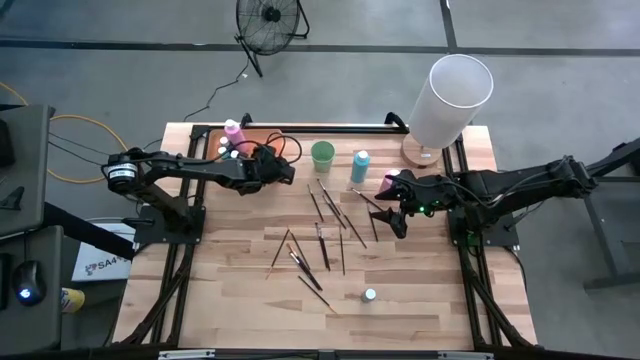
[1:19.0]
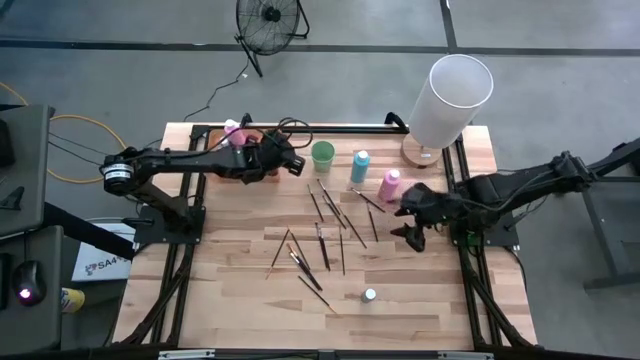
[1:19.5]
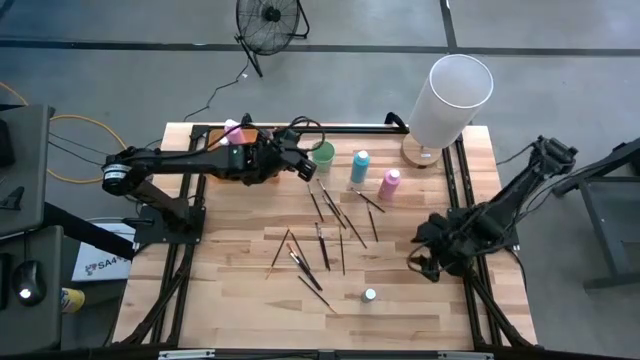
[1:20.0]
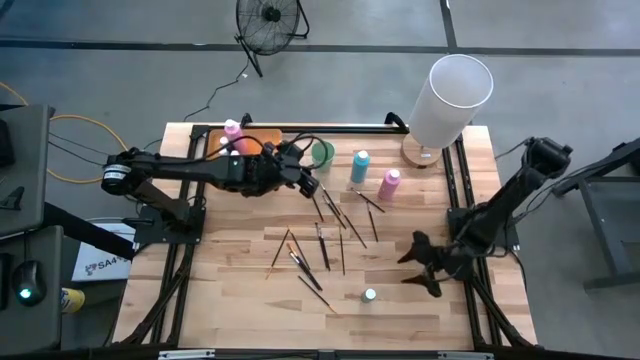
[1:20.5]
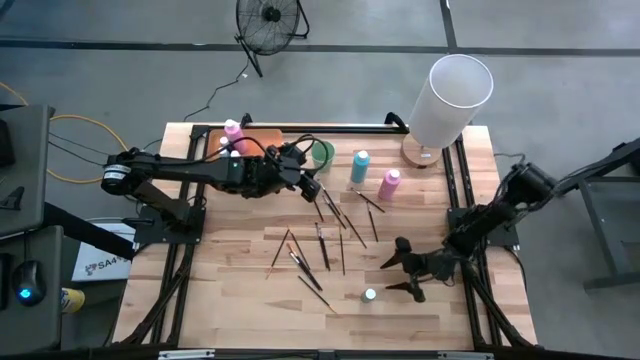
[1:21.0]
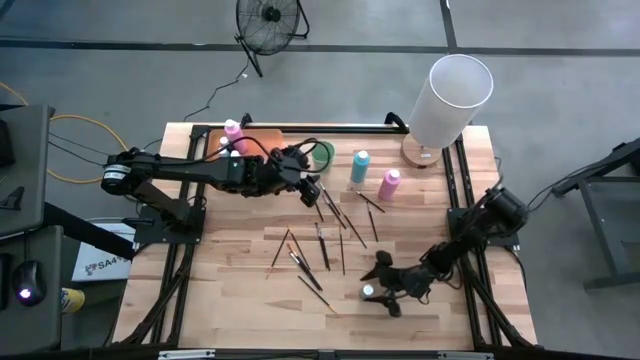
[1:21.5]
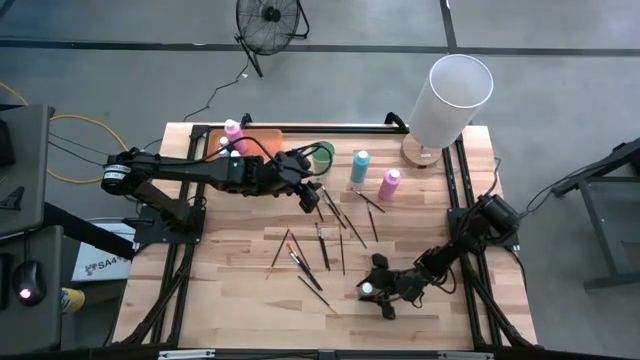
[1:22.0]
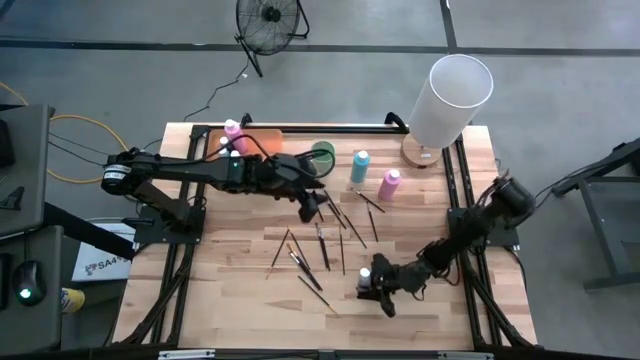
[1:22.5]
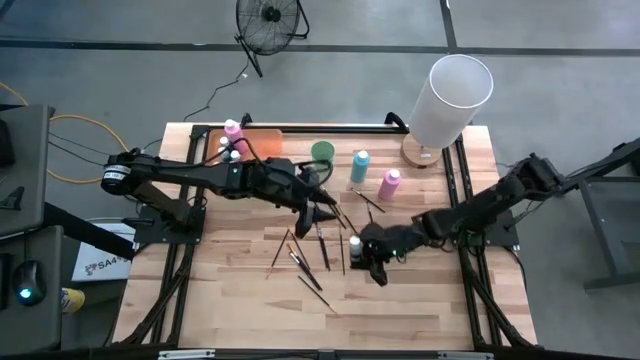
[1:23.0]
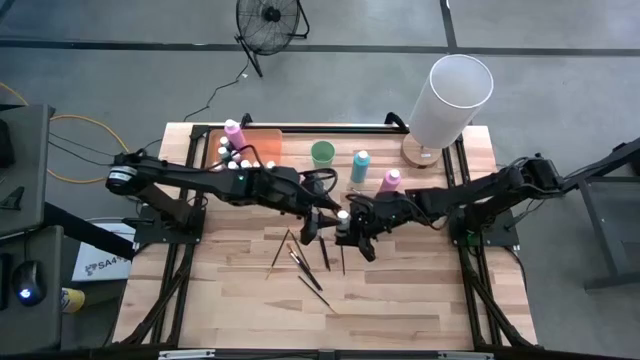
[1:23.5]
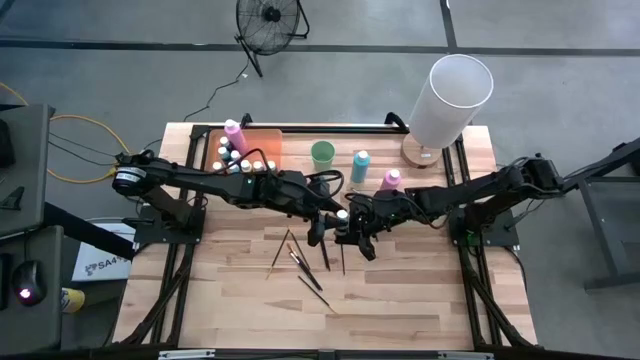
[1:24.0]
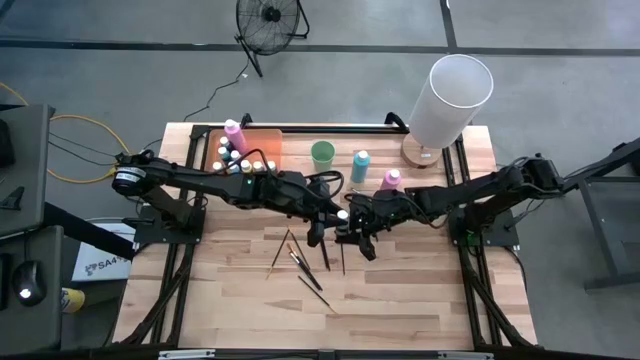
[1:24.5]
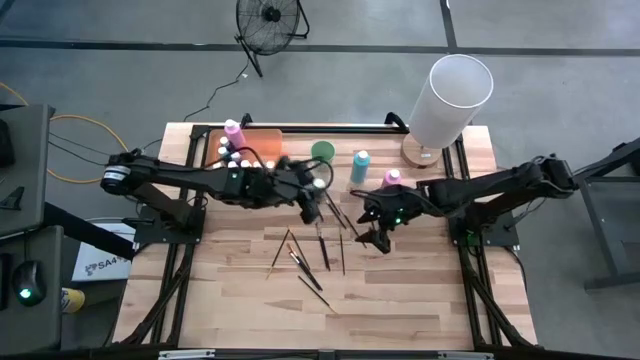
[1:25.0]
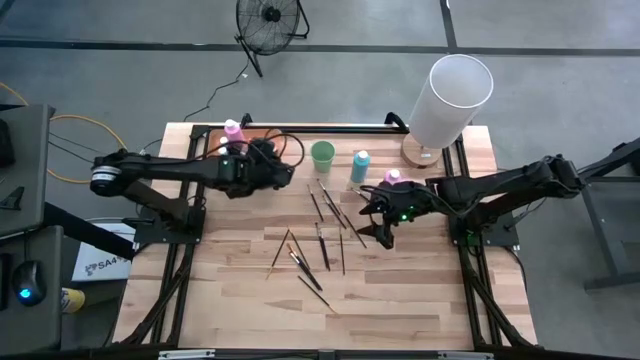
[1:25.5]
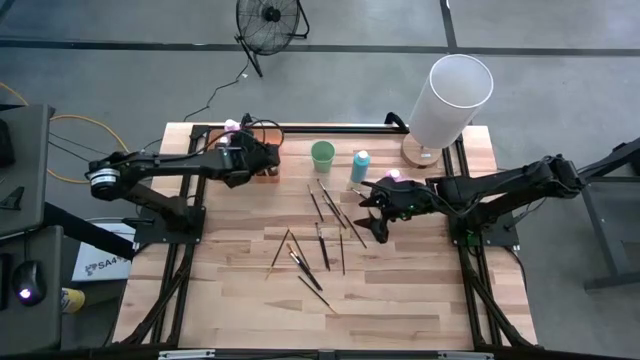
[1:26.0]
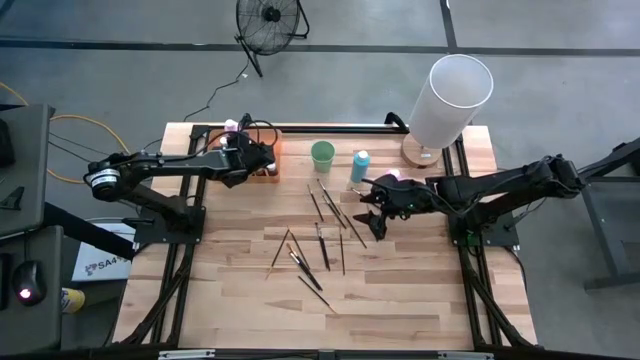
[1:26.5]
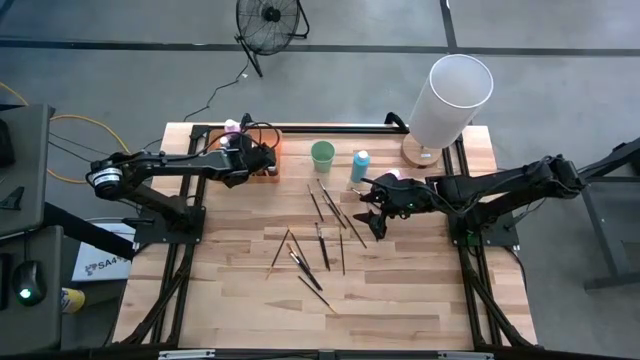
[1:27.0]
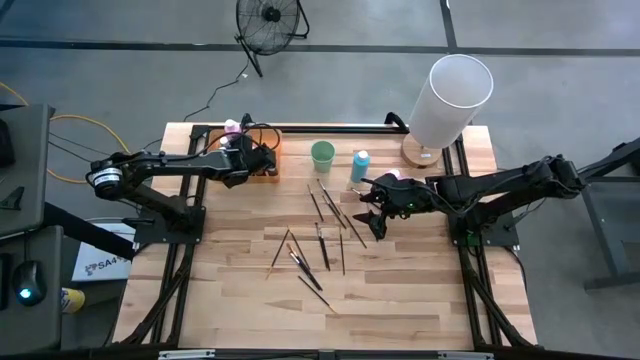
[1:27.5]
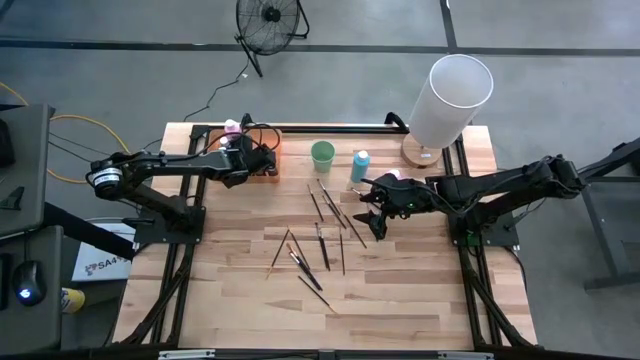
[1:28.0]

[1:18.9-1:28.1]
Task: Pick & Place Paint Supplies
Put the gray paint bottle into the orange bin

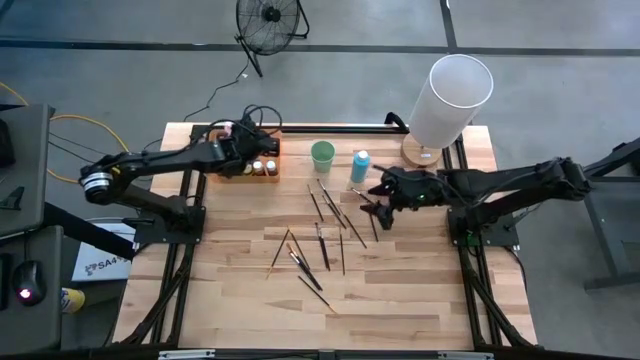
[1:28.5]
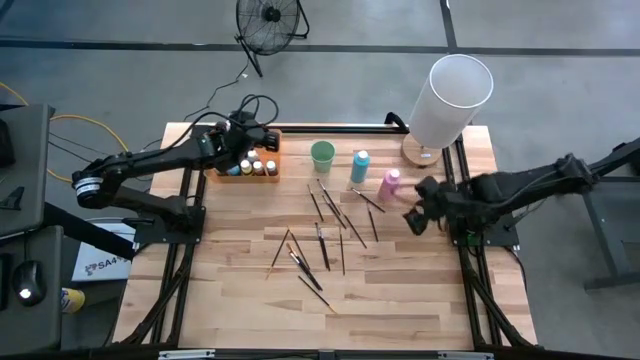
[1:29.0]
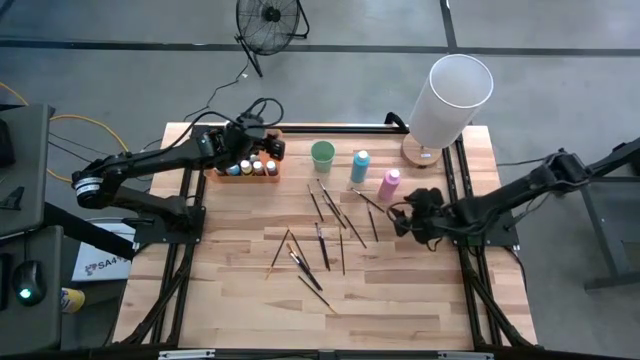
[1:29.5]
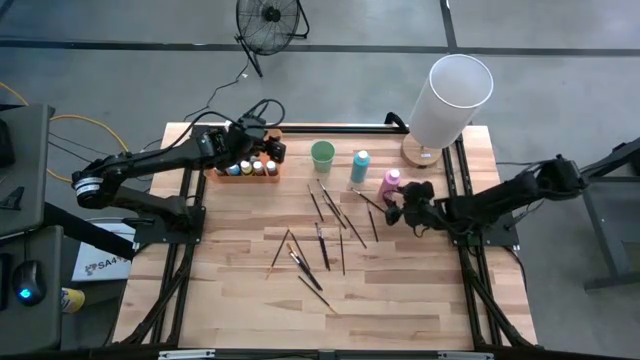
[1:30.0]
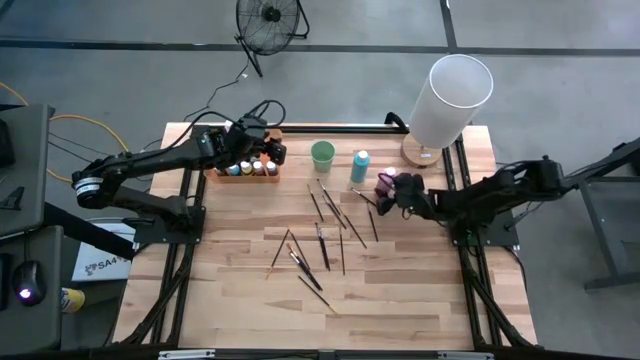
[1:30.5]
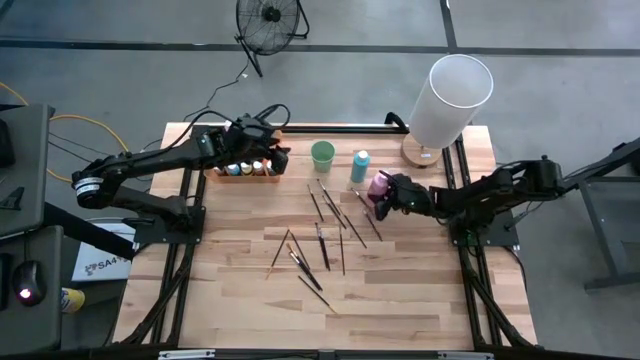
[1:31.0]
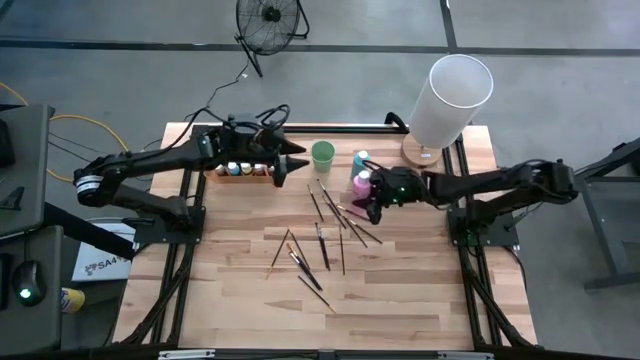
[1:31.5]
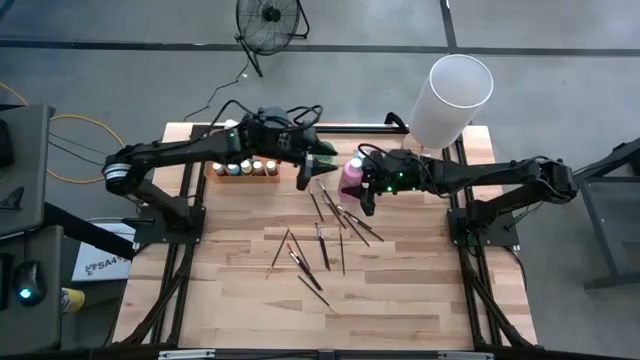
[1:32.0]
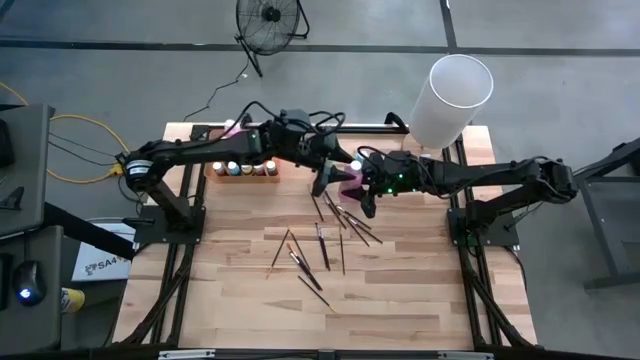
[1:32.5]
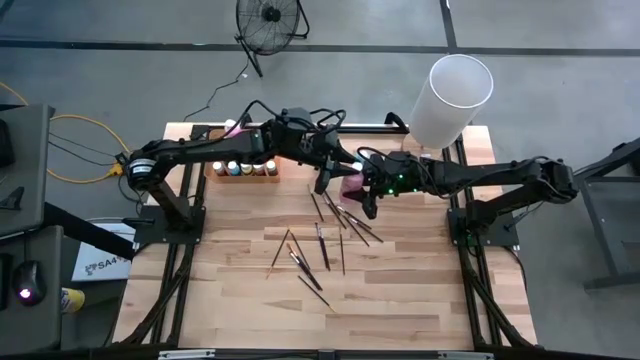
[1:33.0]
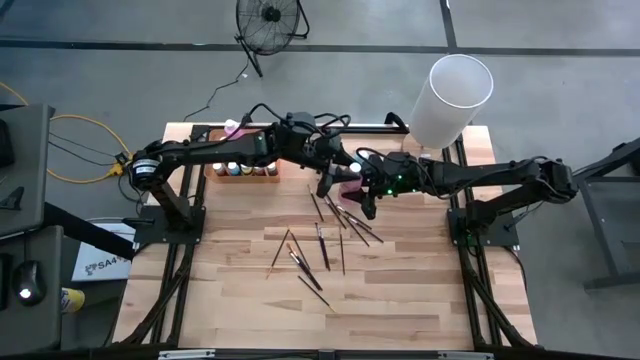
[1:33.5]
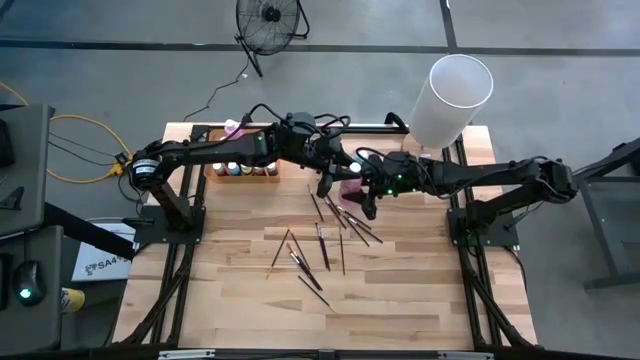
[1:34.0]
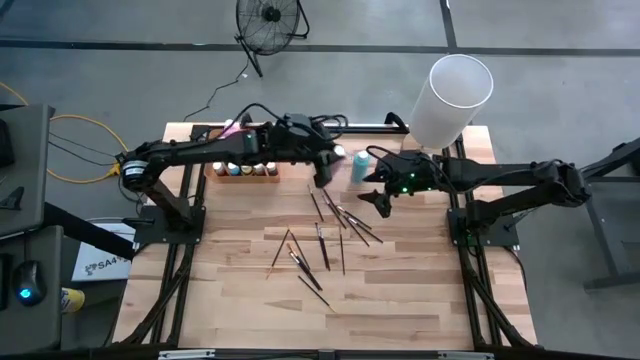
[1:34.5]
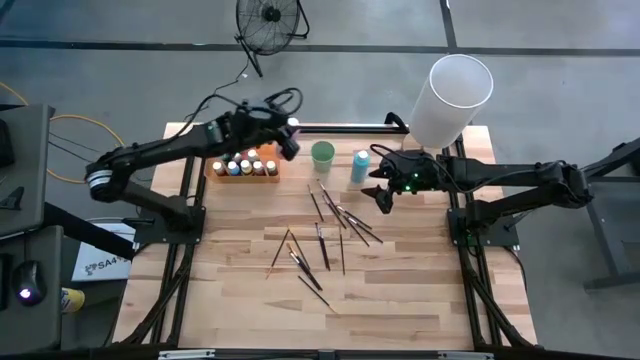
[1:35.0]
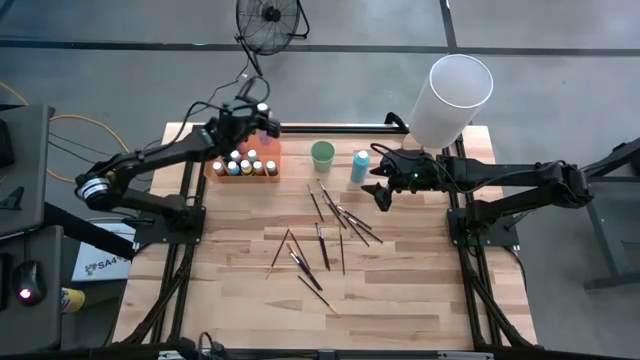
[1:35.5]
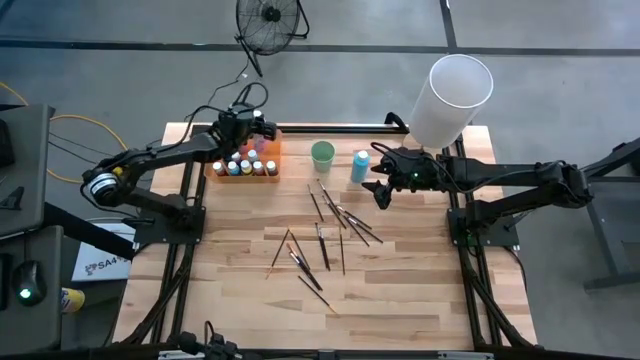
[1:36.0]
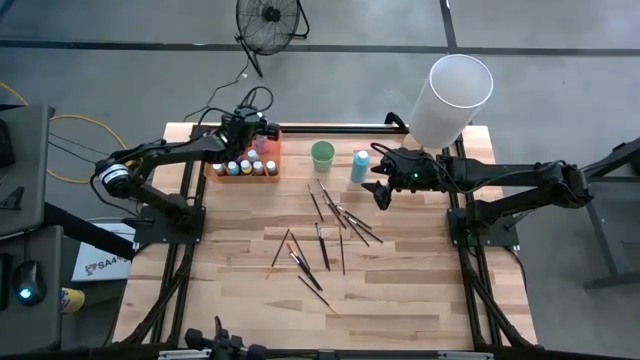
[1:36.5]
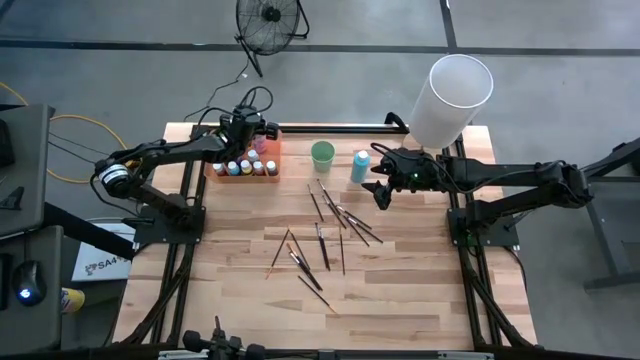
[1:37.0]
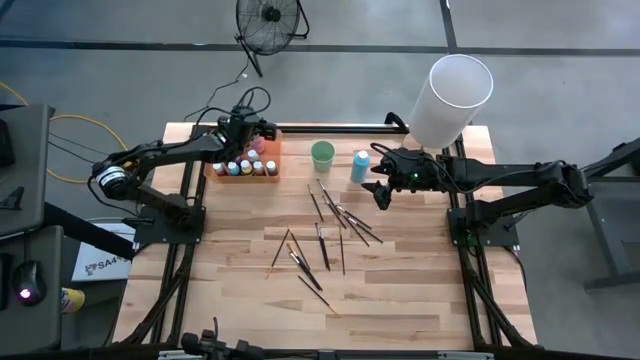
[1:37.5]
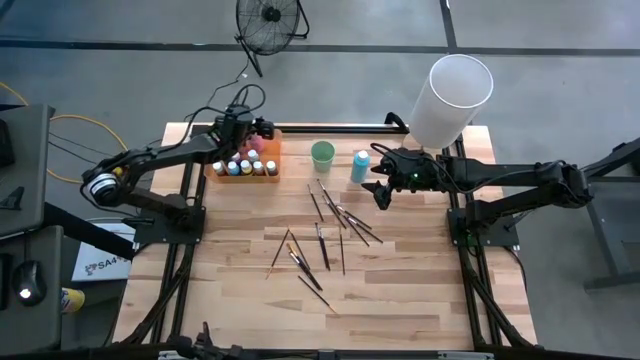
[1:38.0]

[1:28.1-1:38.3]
Put the pink paint bottle into the orange bin

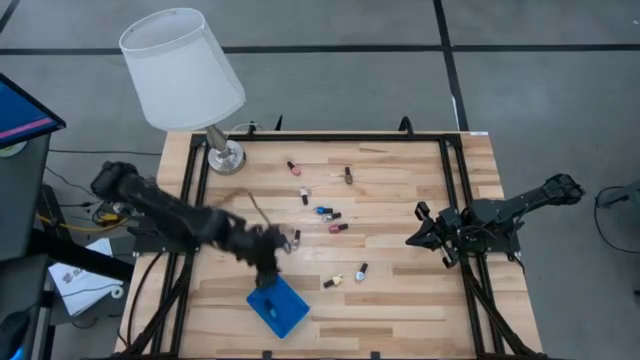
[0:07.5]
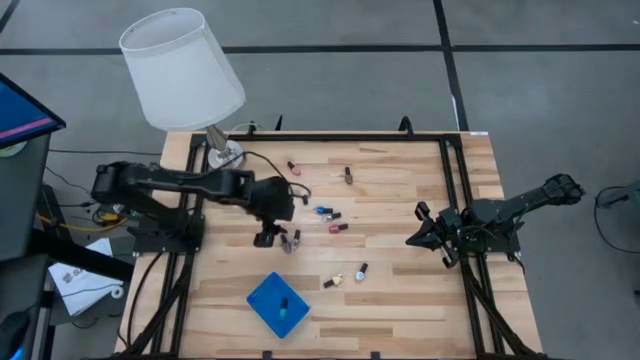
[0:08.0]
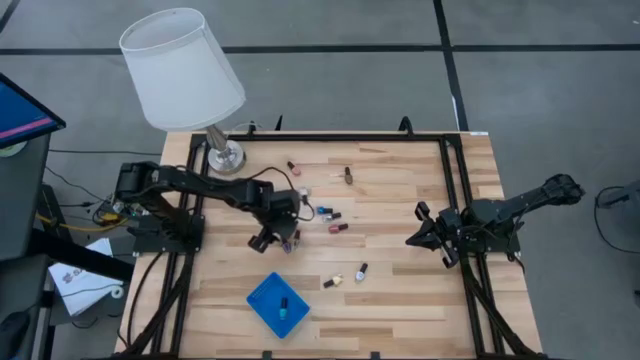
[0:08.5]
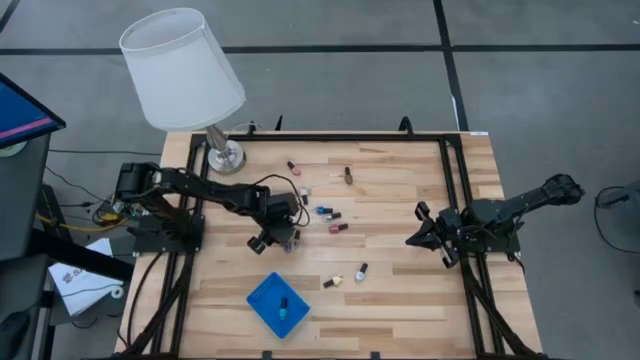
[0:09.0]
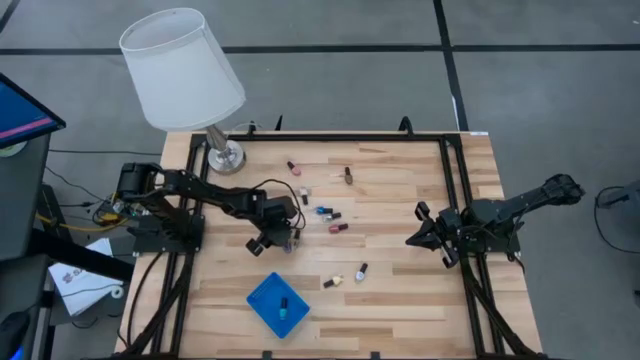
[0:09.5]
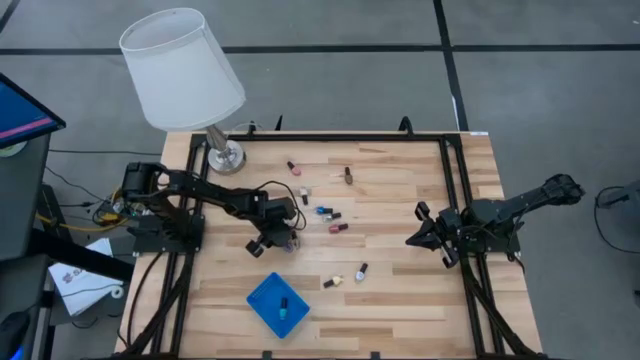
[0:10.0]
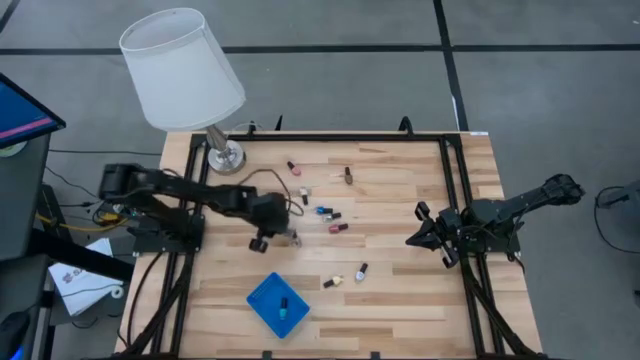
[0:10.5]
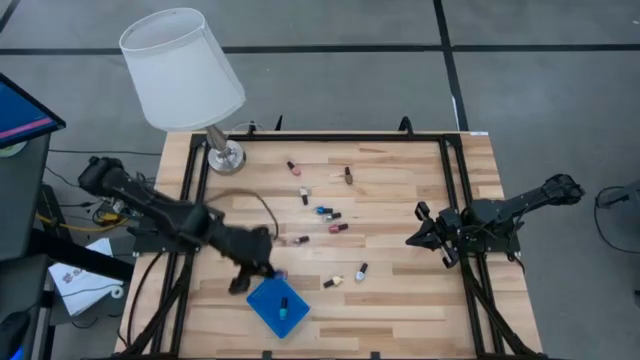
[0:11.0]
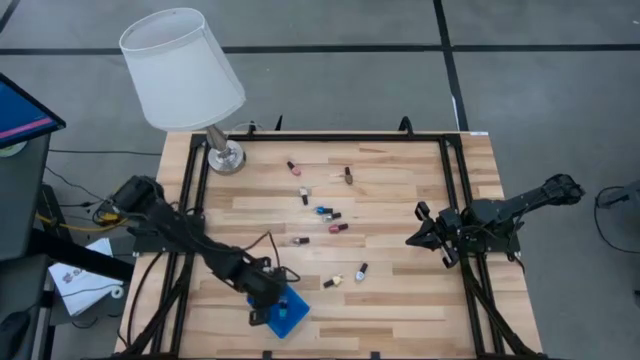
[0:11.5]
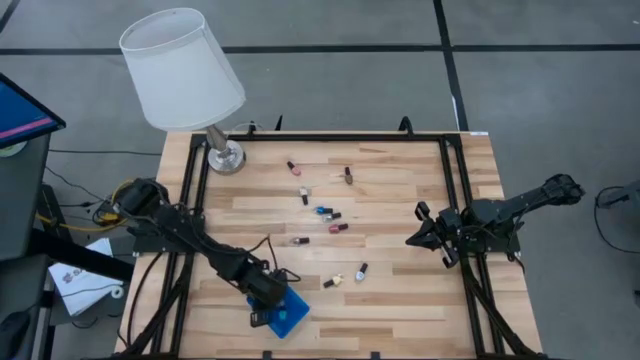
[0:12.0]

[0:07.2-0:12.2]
Task: Pick & Place Nail Polish
Put the violet nail polish bottle in the blue bin
